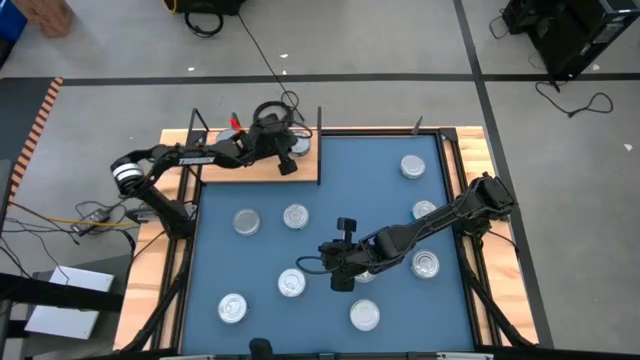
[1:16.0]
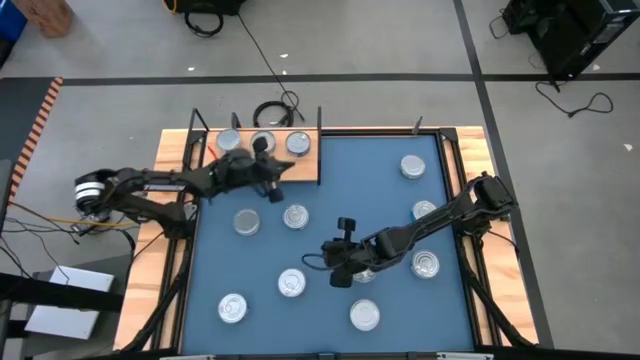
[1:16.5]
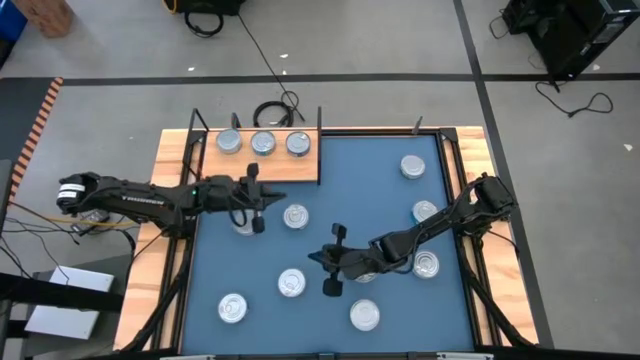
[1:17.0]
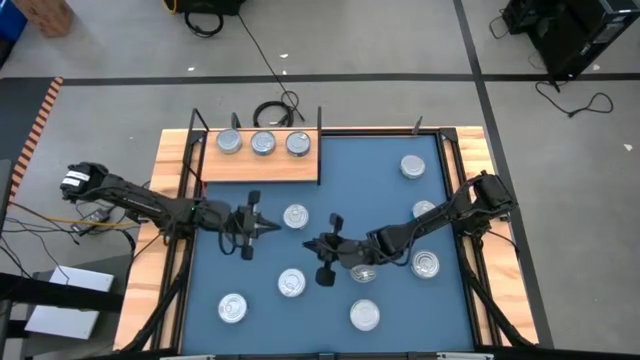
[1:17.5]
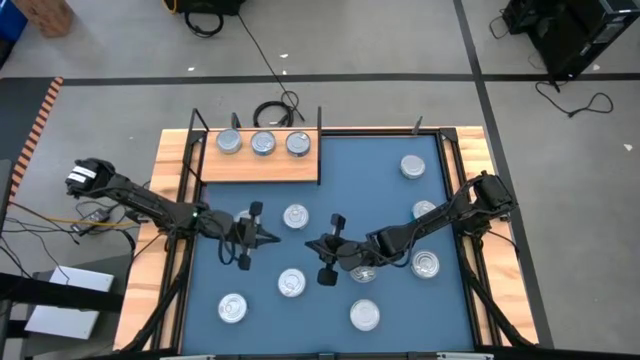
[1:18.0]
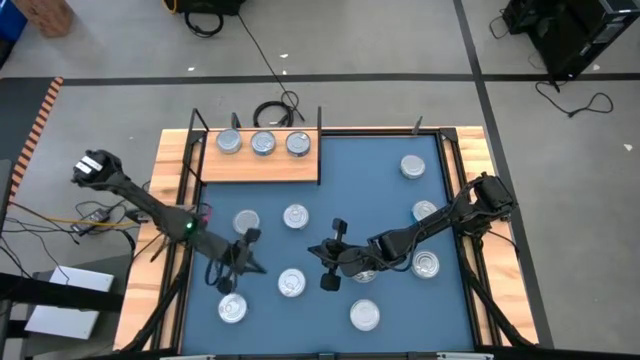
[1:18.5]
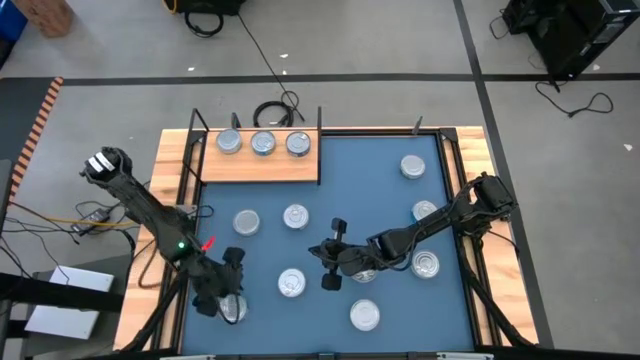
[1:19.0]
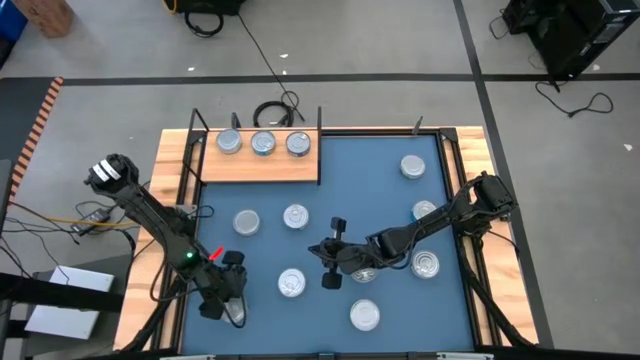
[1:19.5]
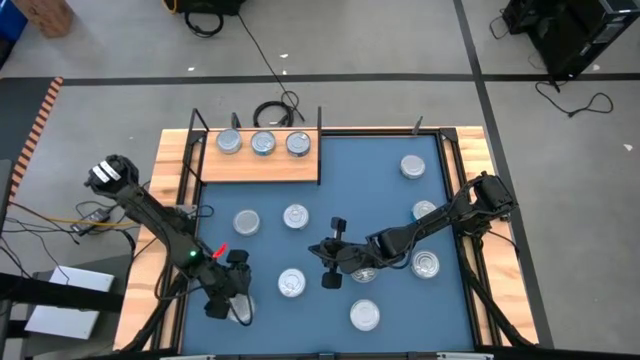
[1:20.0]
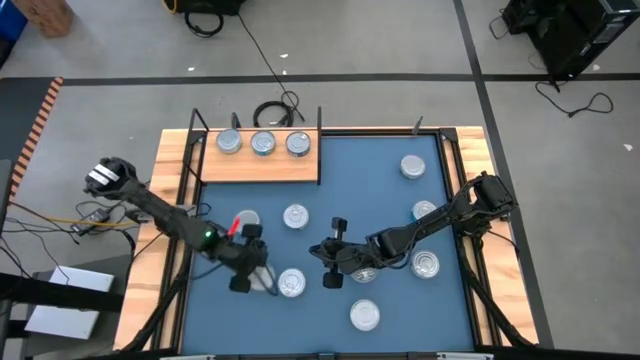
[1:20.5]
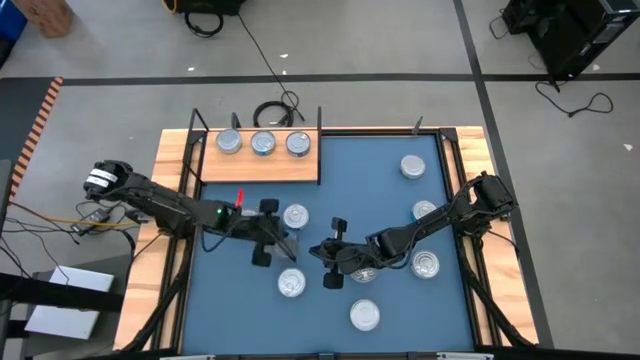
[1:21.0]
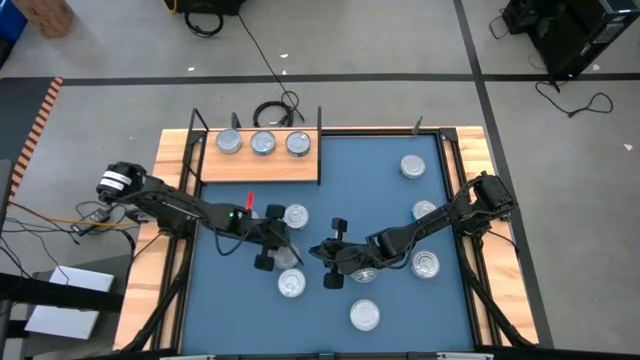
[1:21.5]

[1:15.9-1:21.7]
Task: Stack canned seafood by type on shelf
Put the blue tuna can on the shelf

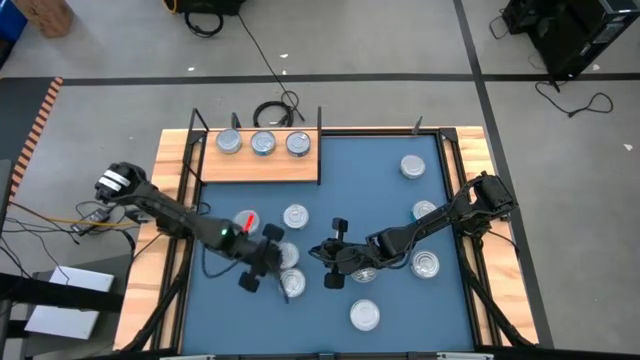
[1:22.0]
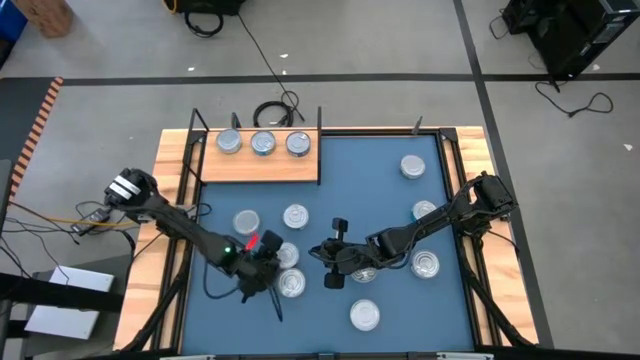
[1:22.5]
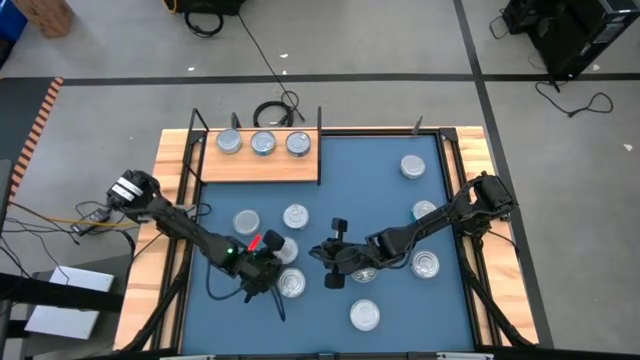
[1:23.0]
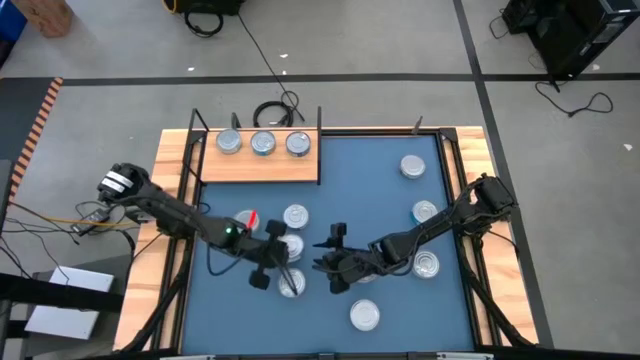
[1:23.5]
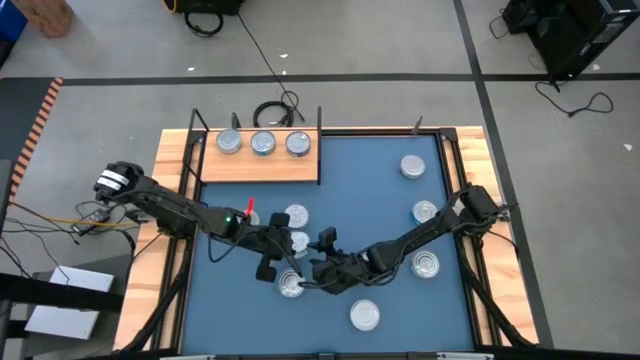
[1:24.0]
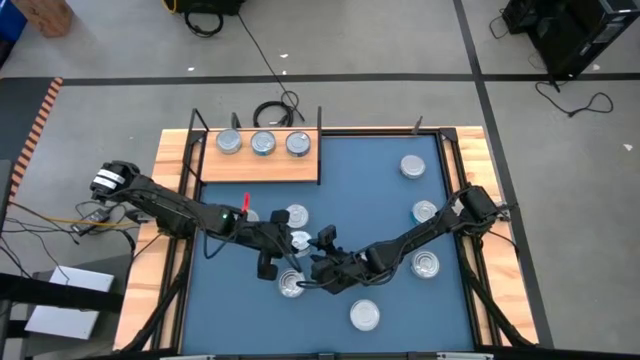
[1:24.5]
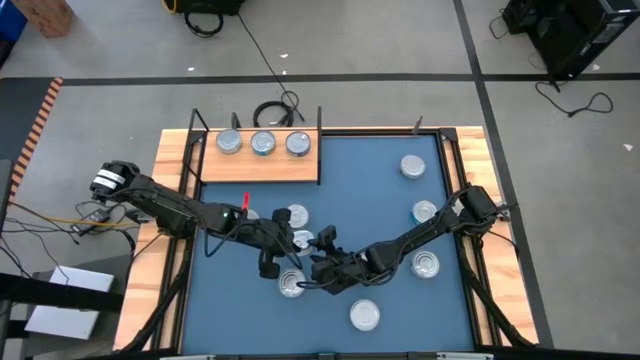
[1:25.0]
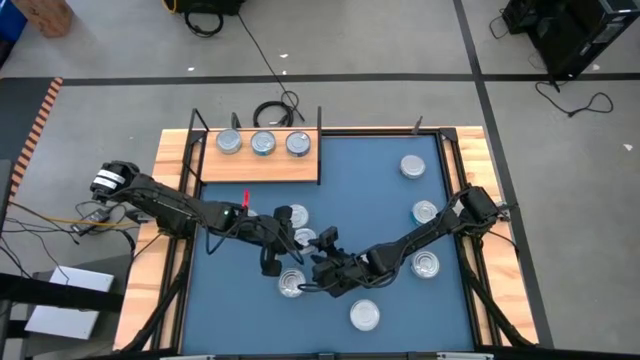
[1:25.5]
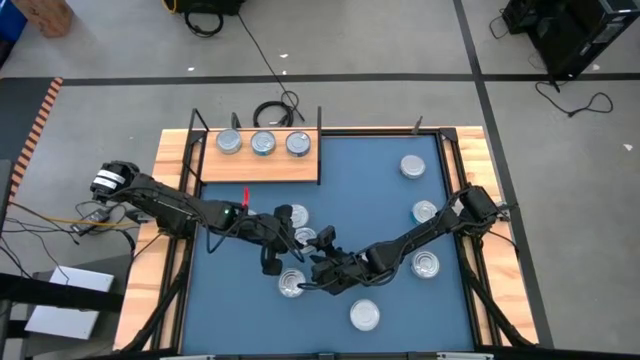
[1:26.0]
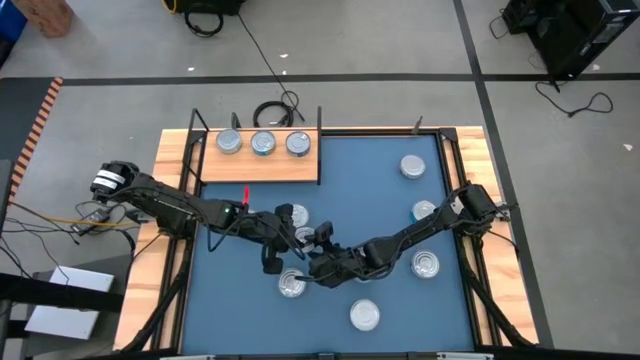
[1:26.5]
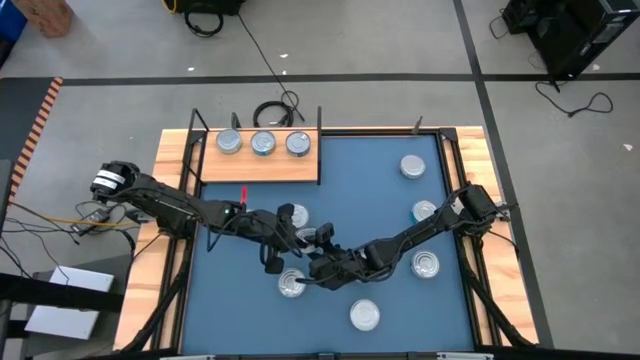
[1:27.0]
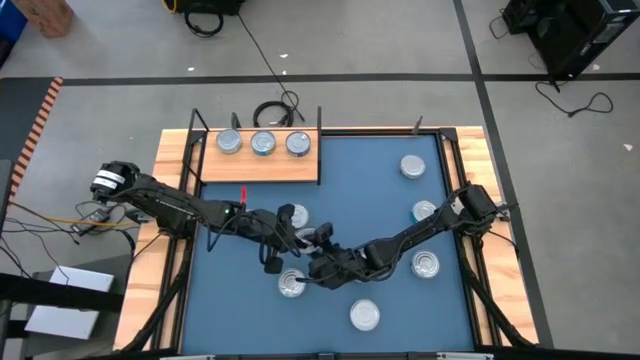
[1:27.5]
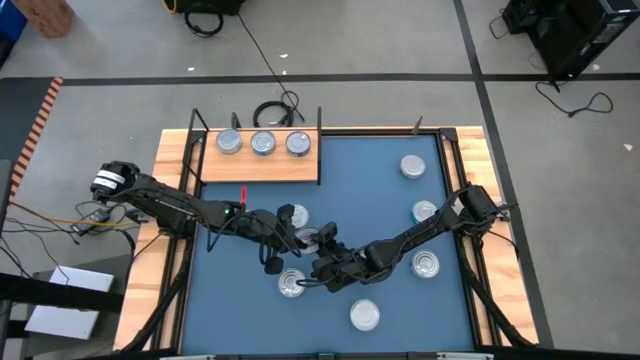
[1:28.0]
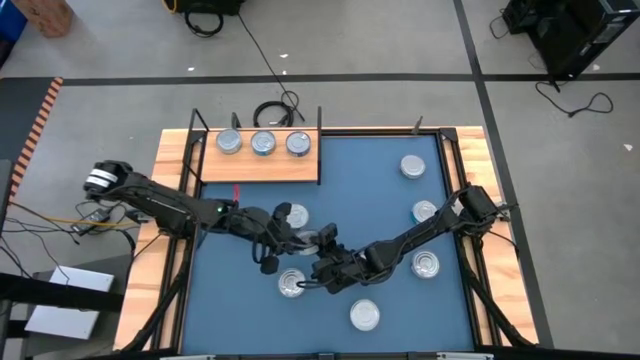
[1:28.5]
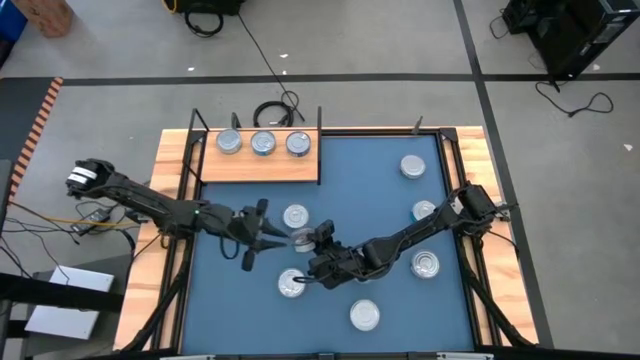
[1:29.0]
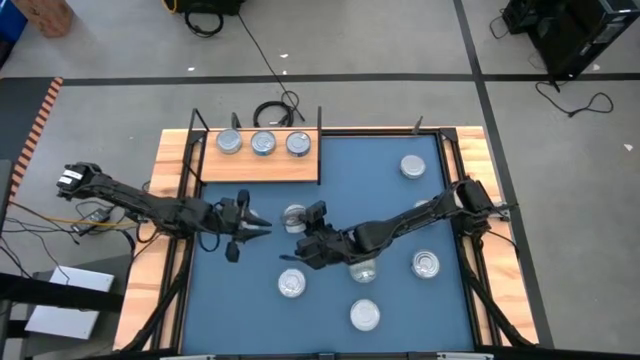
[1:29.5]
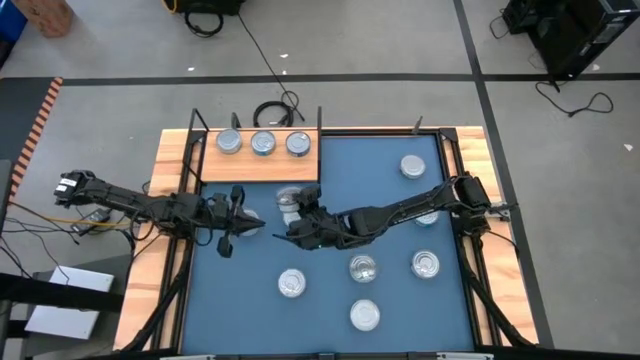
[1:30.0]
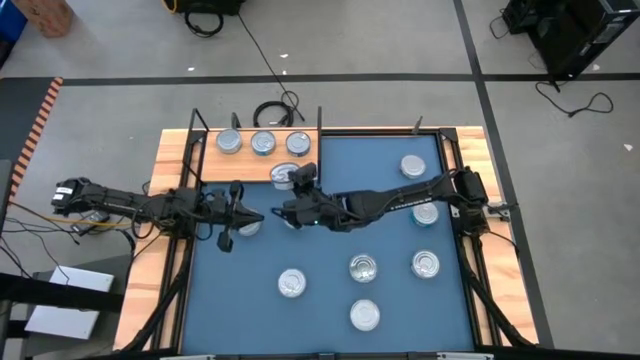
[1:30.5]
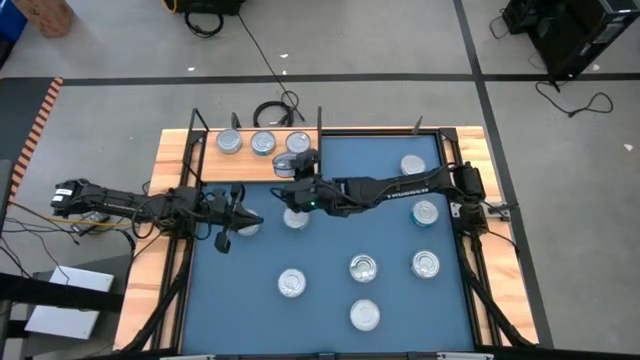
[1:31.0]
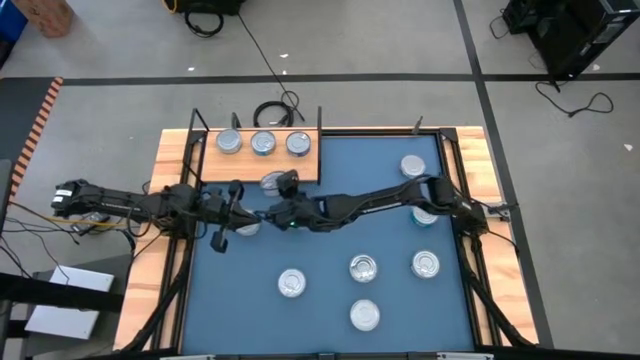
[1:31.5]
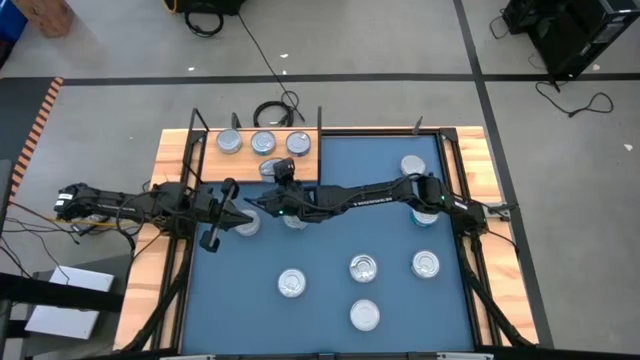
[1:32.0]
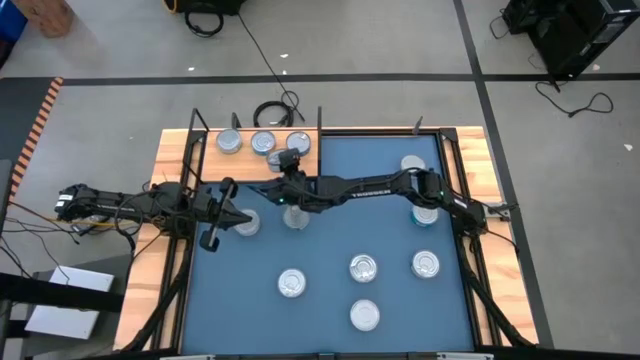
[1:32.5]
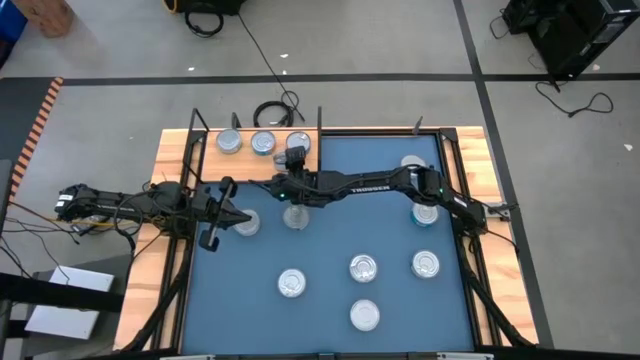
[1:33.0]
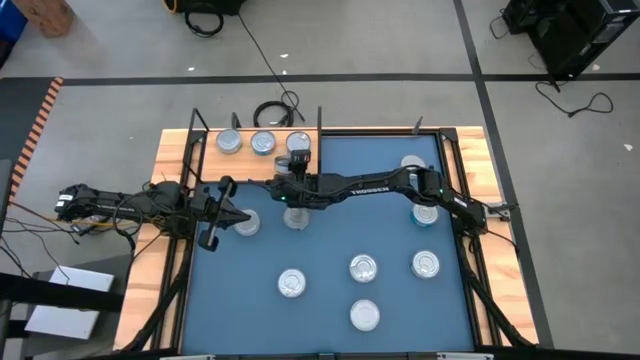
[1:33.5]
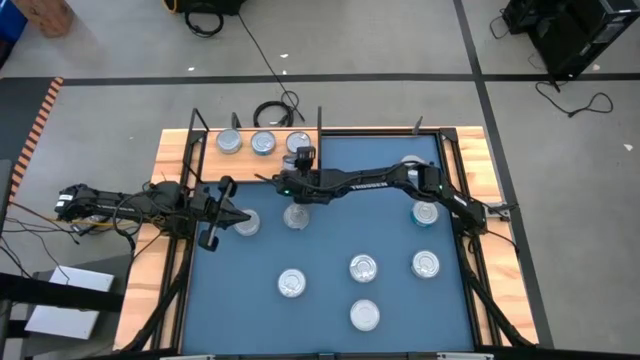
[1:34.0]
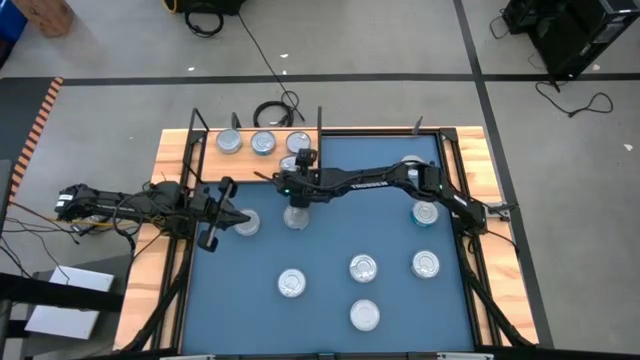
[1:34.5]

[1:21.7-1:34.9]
Put the blue tuna can on the shelf
